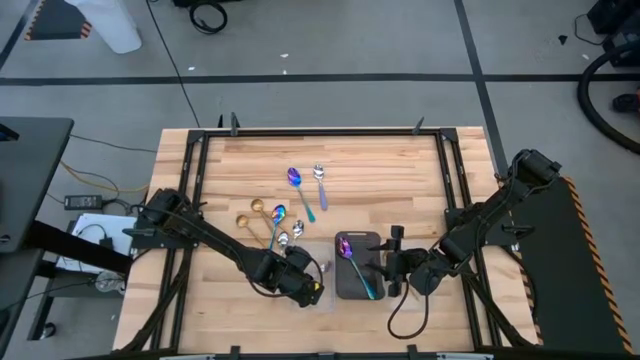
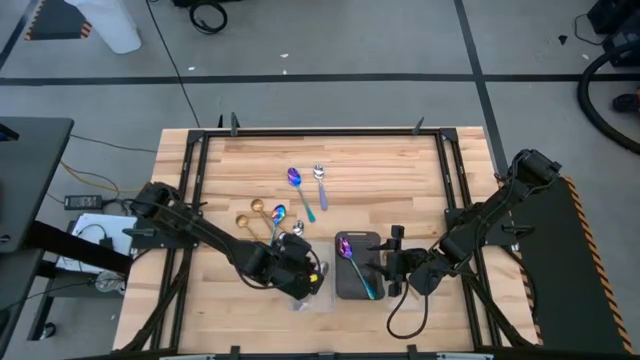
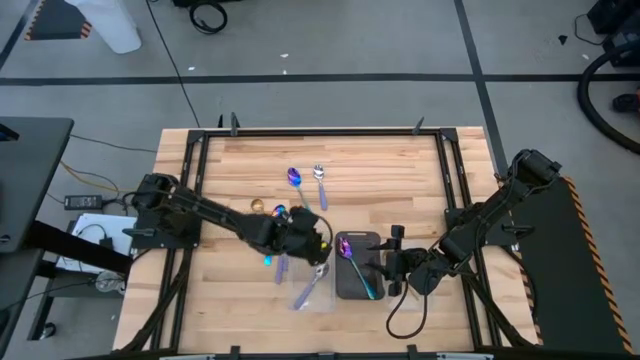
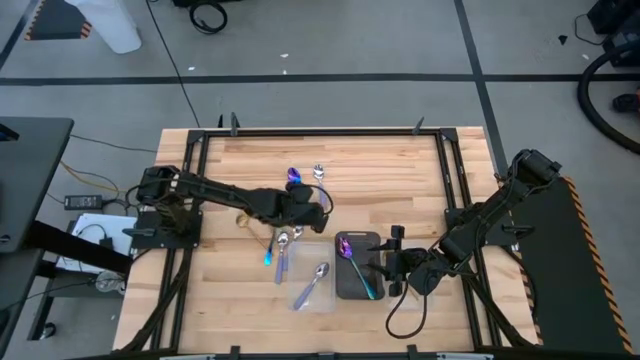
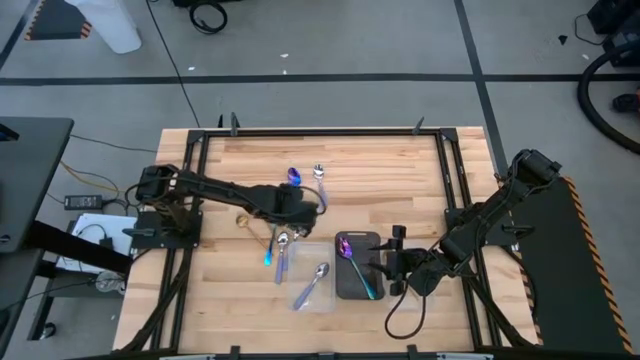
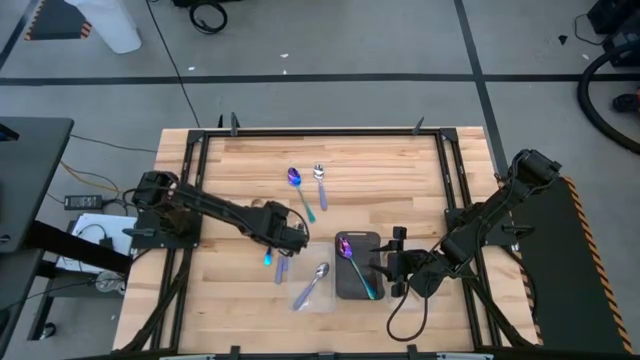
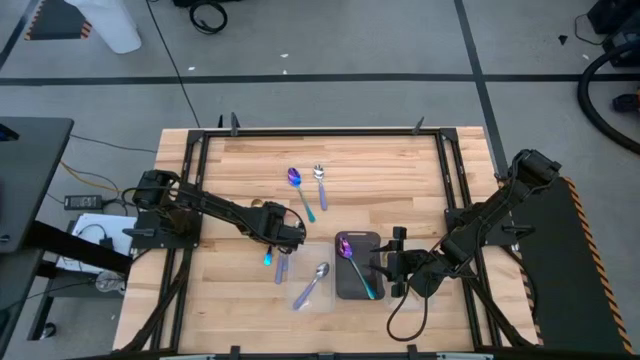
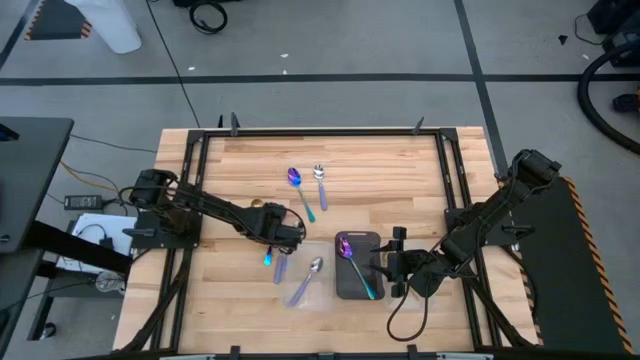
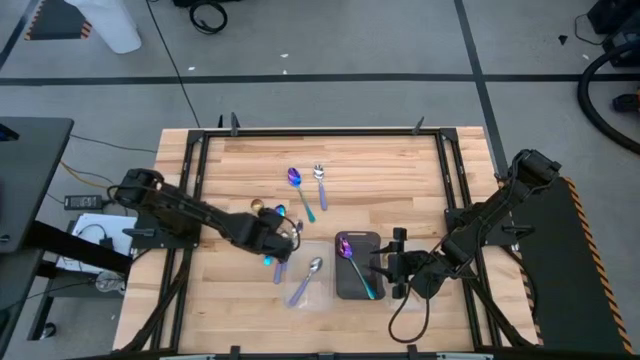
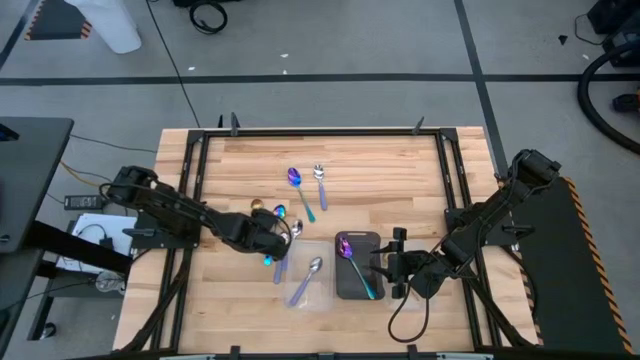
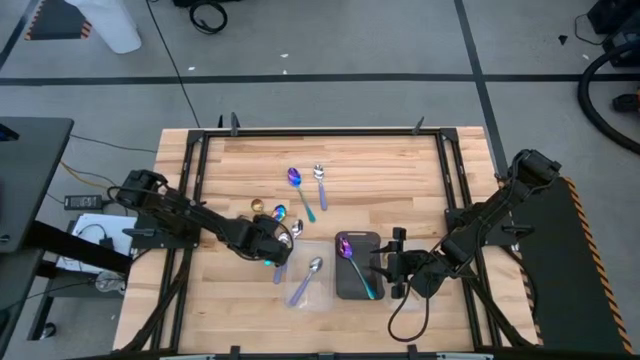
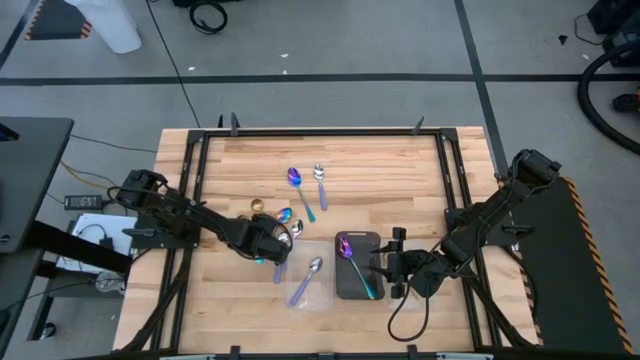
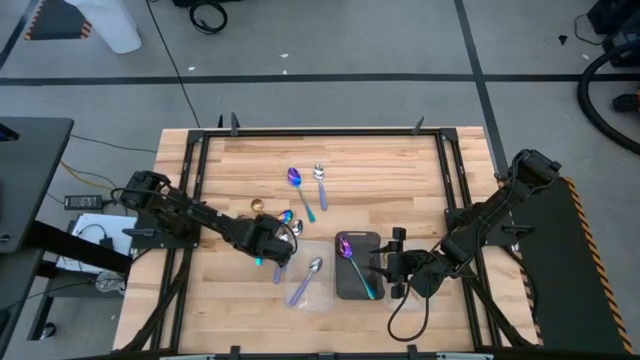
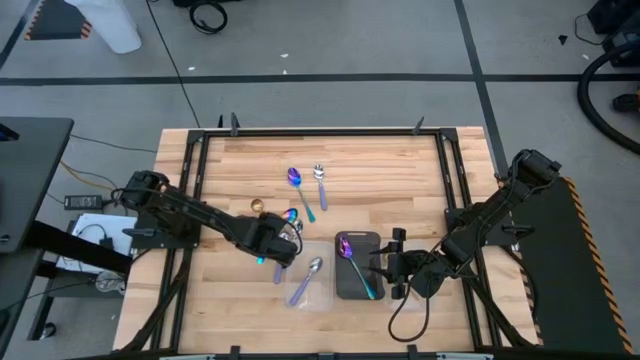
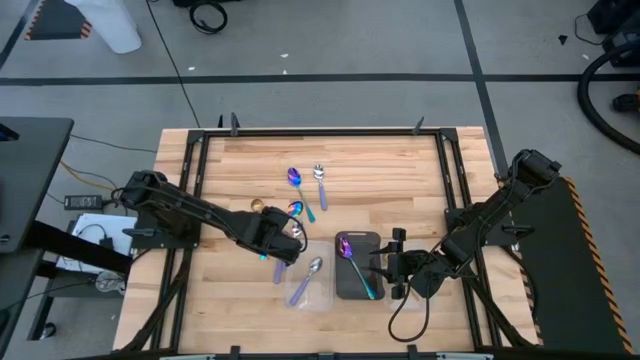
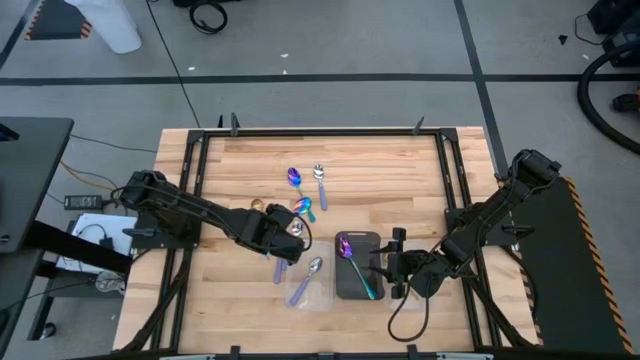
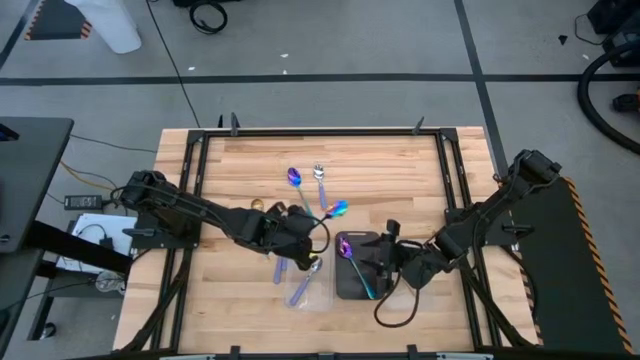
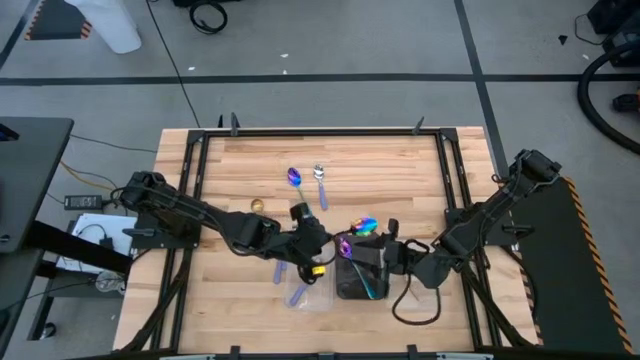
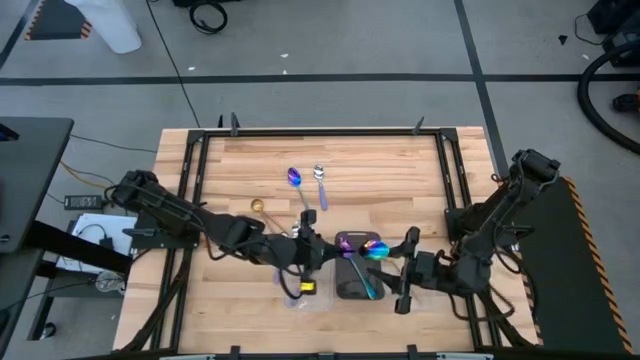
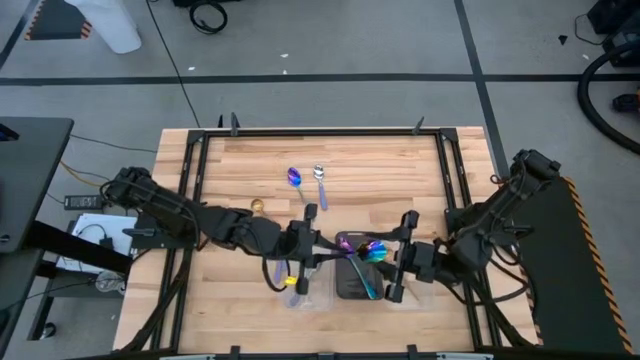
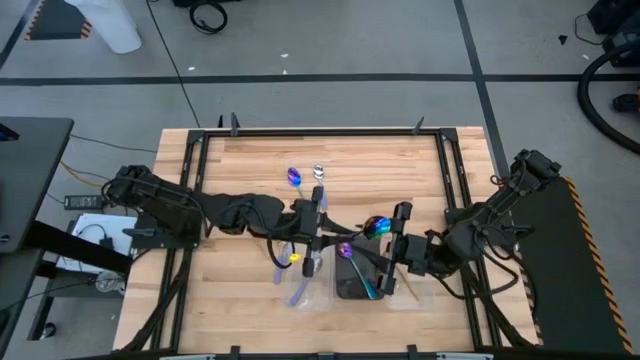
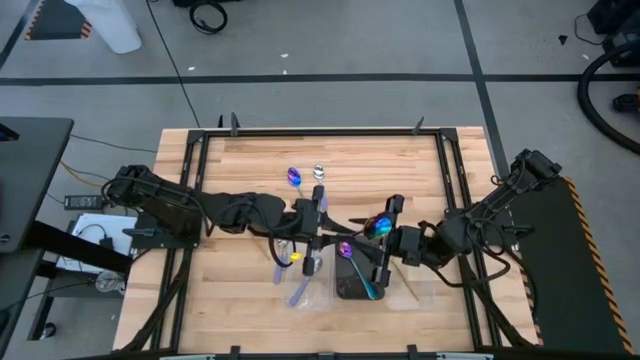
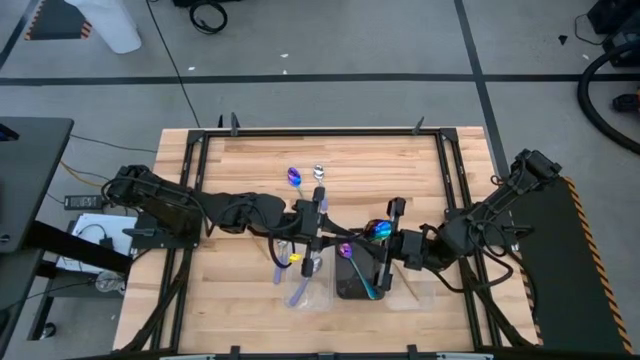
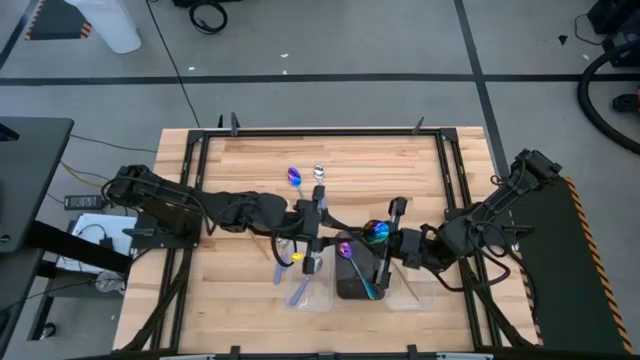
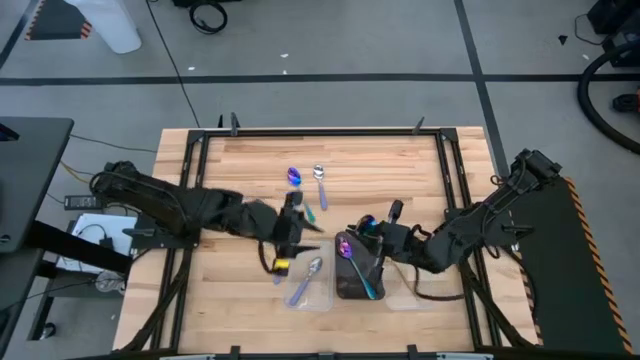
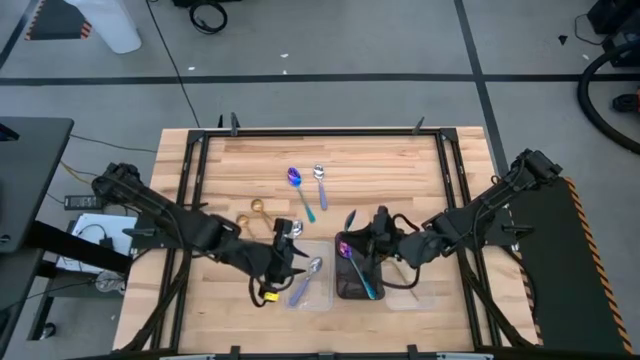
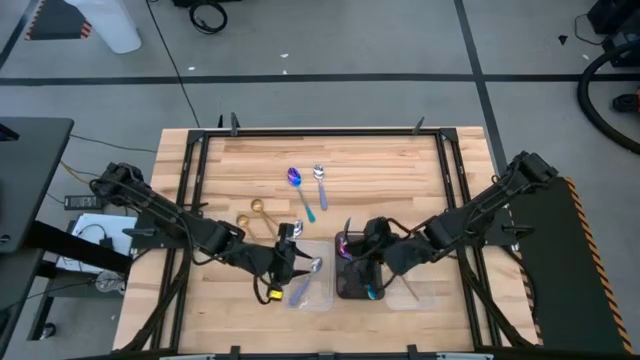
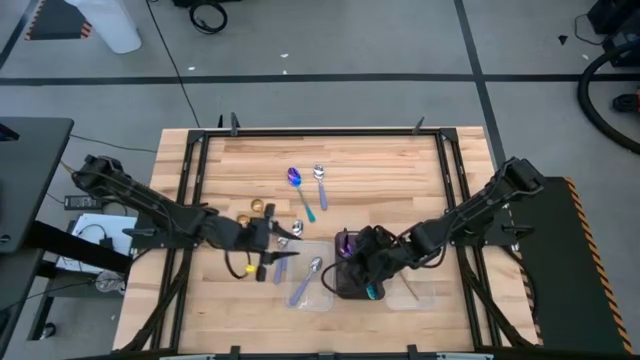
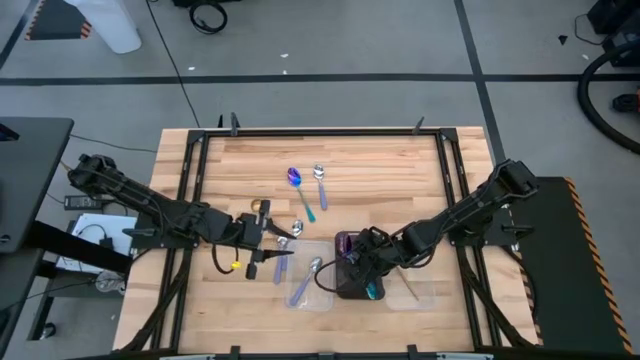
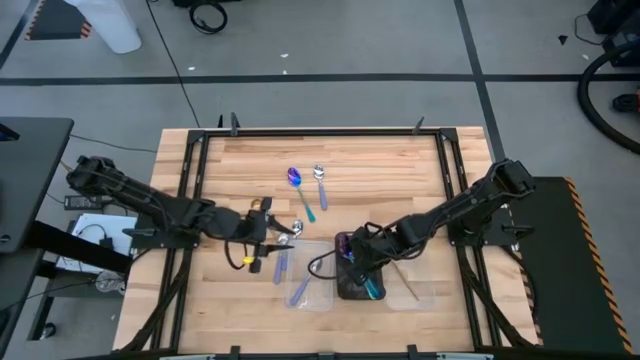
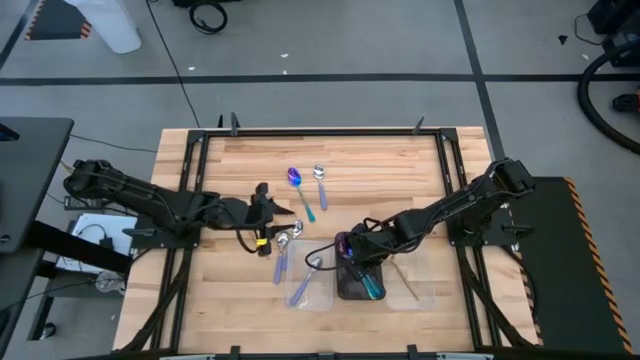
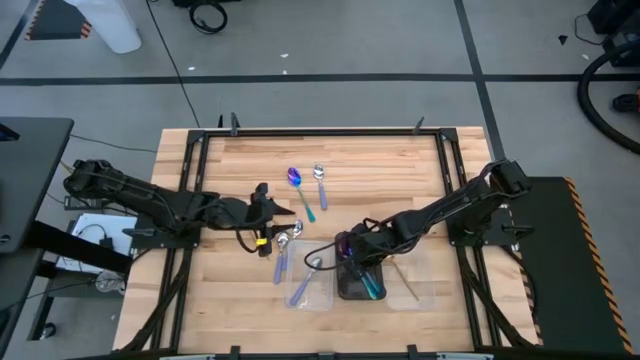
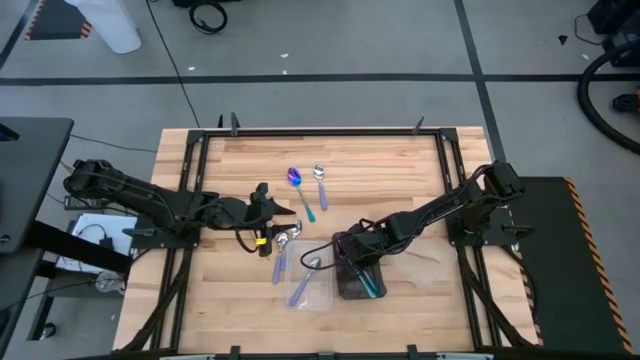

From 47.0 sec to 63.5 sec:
Task: Sort silverware by color (type)
Put the blue spoon into the black bin

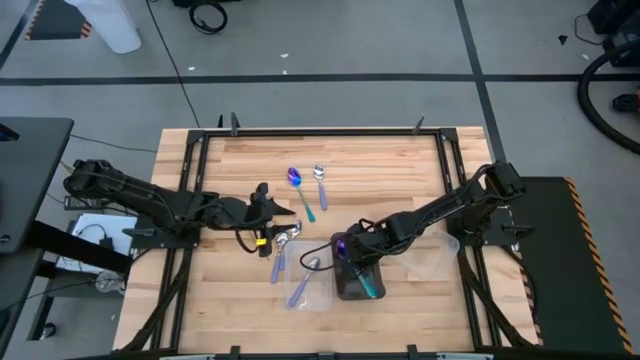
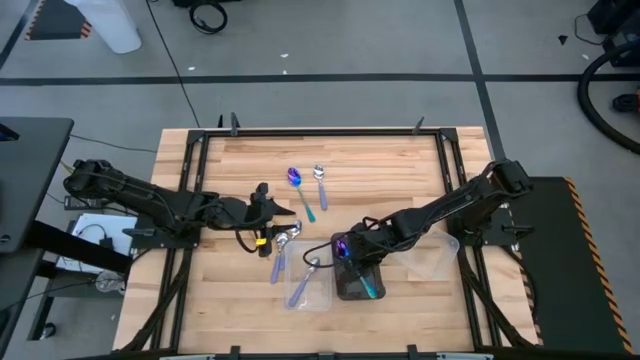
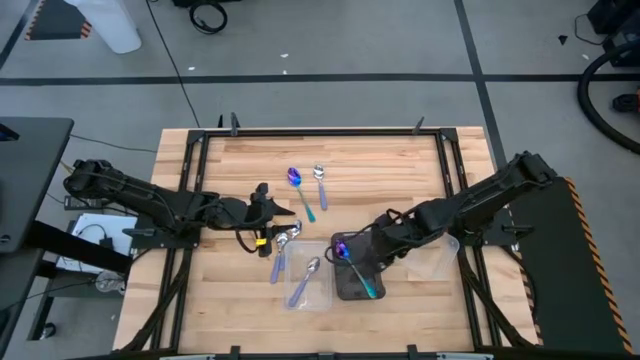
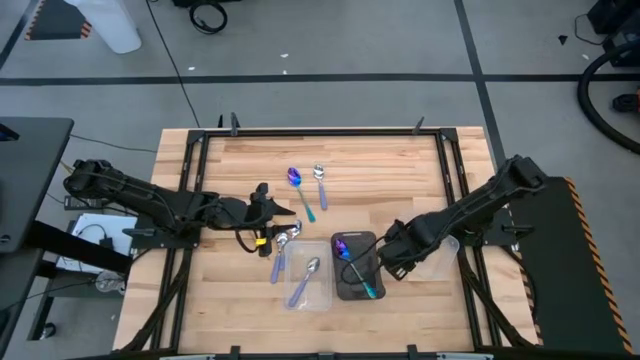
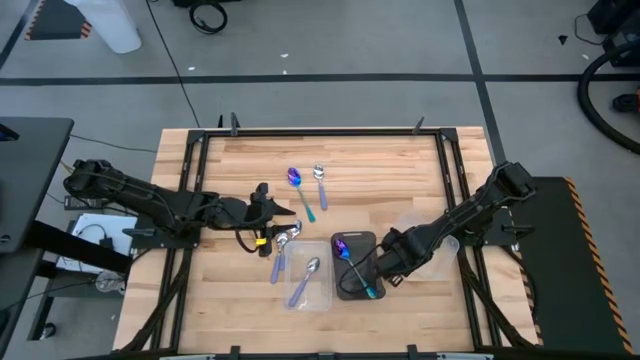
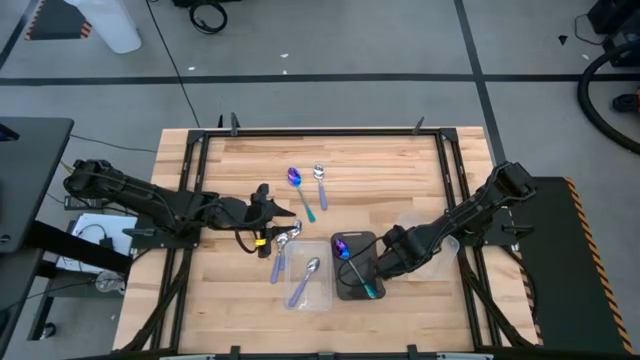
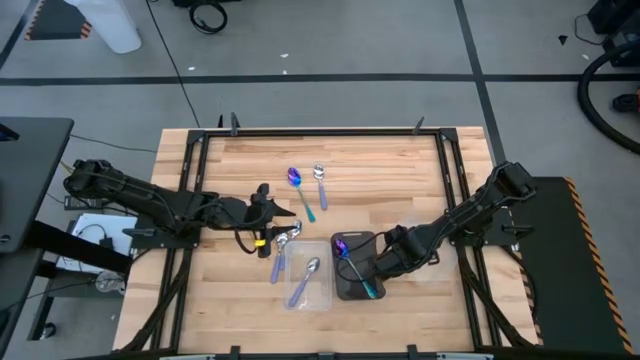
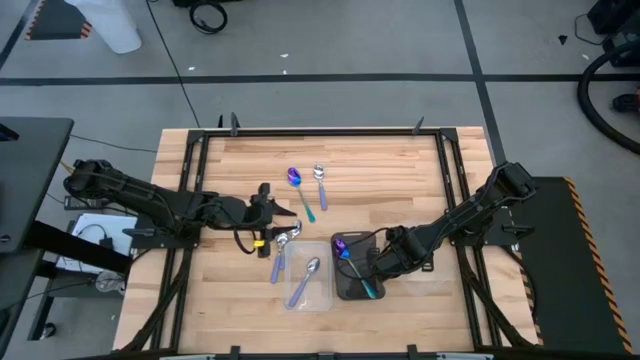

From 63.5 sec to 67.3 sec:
Adjust the right transparent bin
